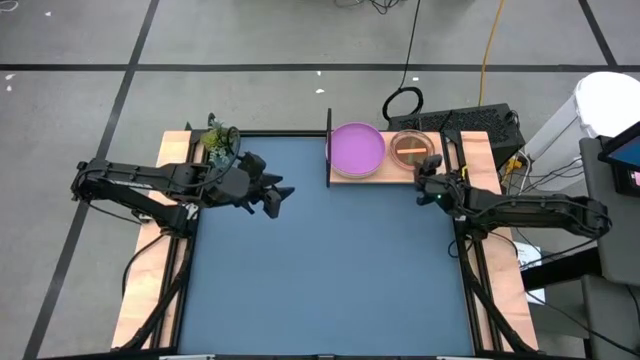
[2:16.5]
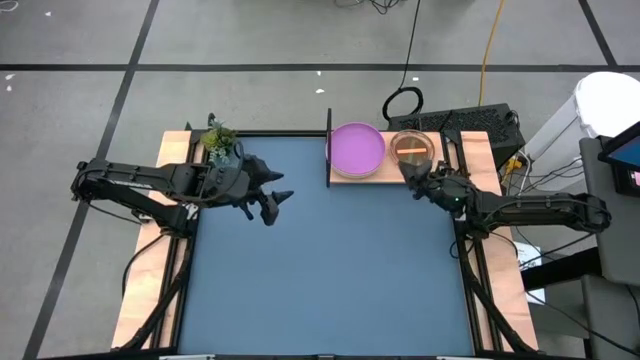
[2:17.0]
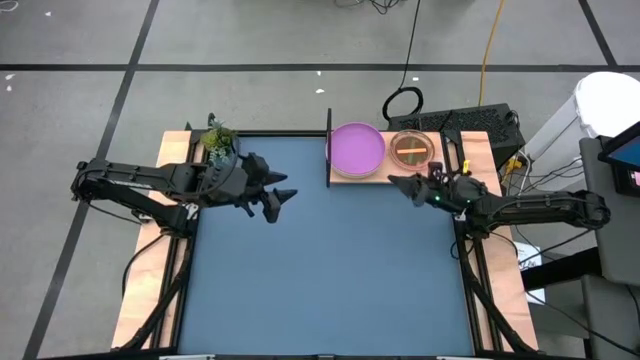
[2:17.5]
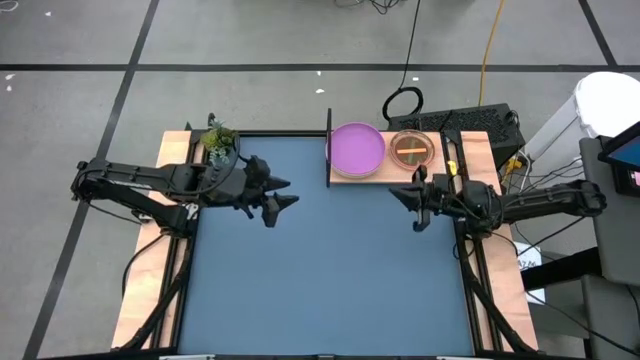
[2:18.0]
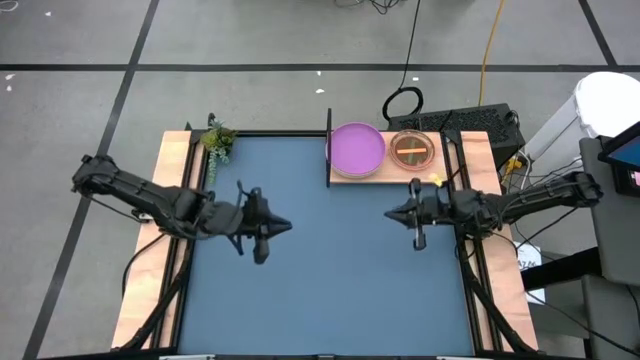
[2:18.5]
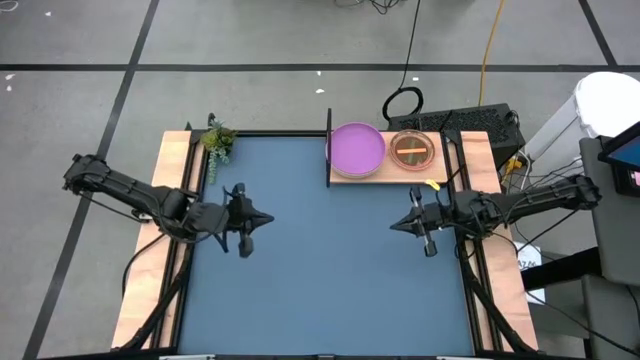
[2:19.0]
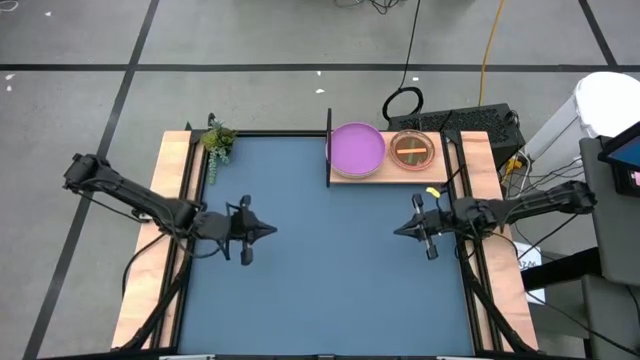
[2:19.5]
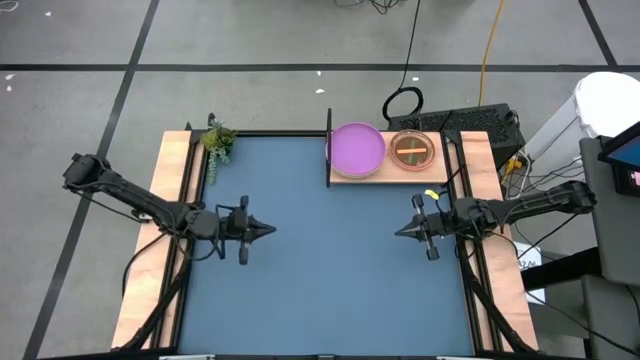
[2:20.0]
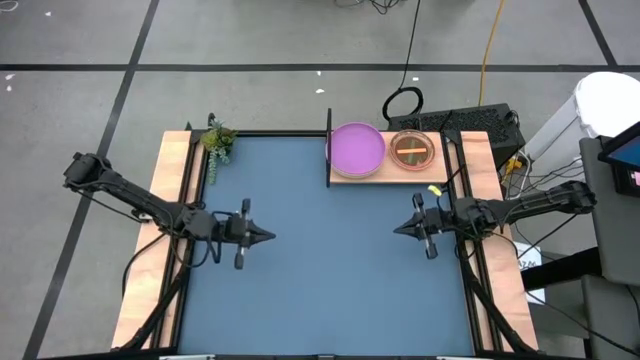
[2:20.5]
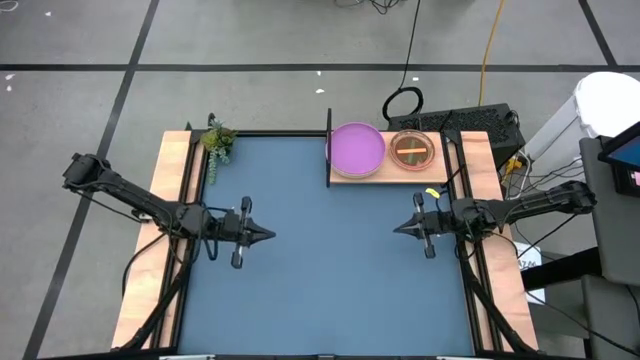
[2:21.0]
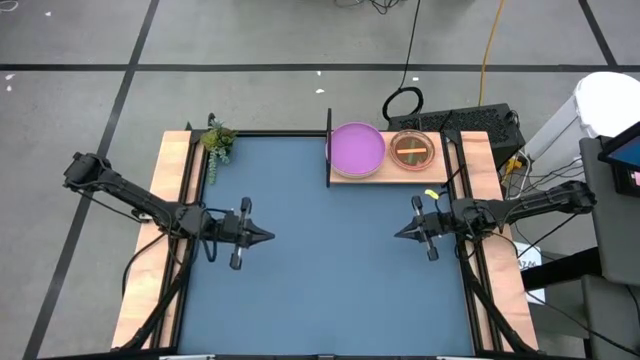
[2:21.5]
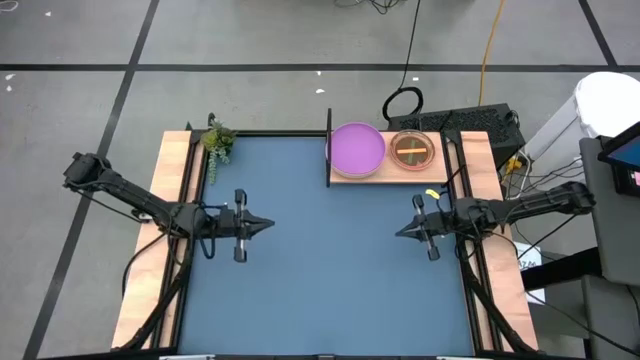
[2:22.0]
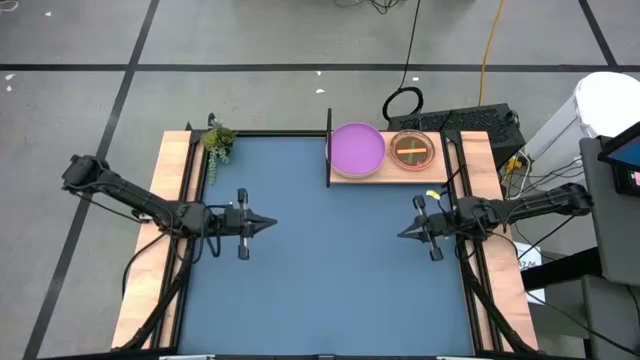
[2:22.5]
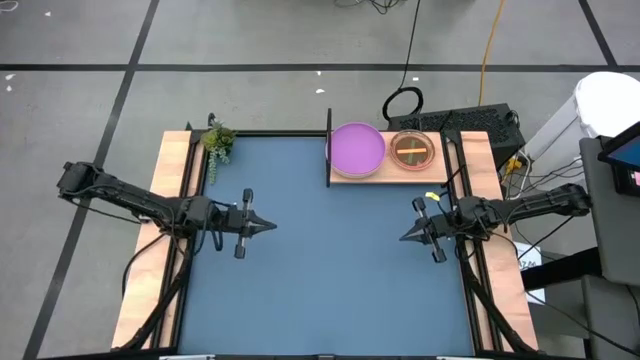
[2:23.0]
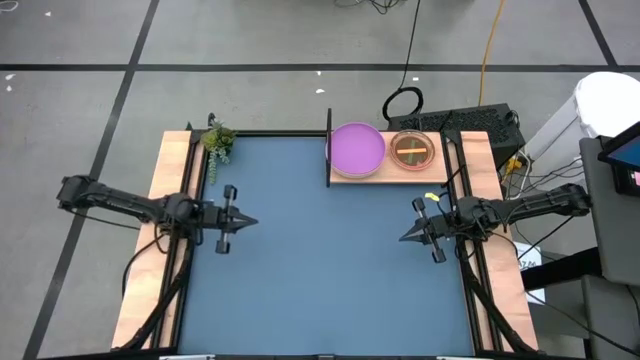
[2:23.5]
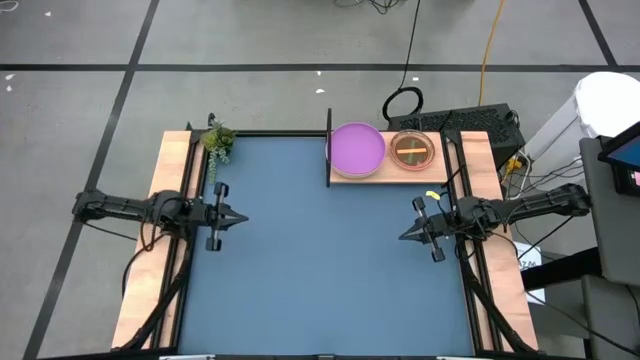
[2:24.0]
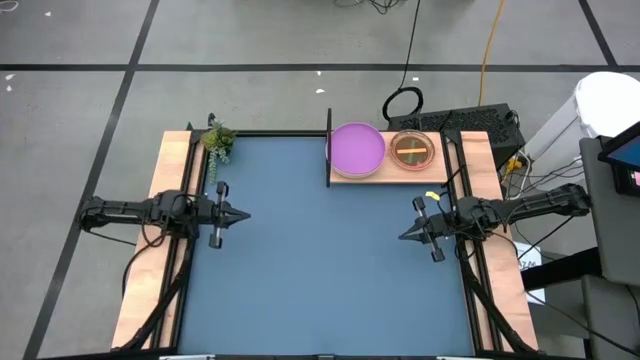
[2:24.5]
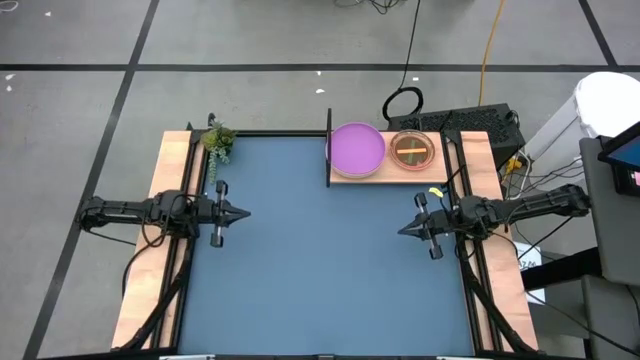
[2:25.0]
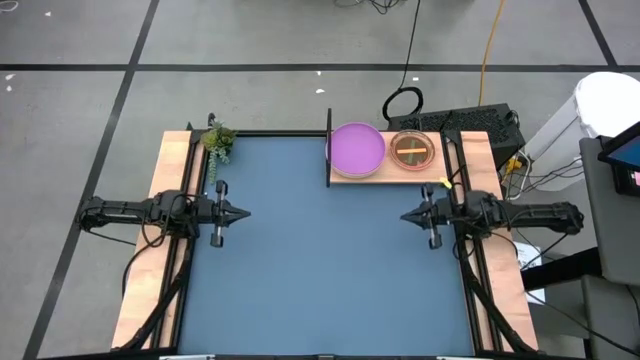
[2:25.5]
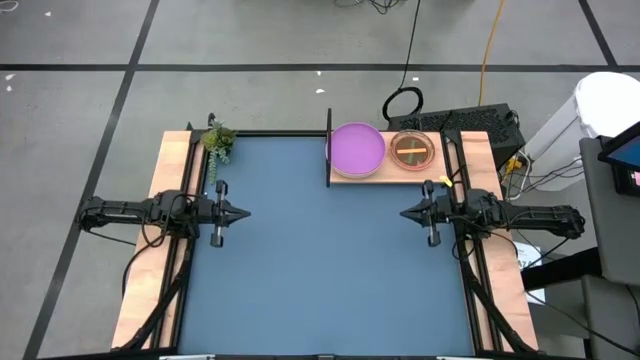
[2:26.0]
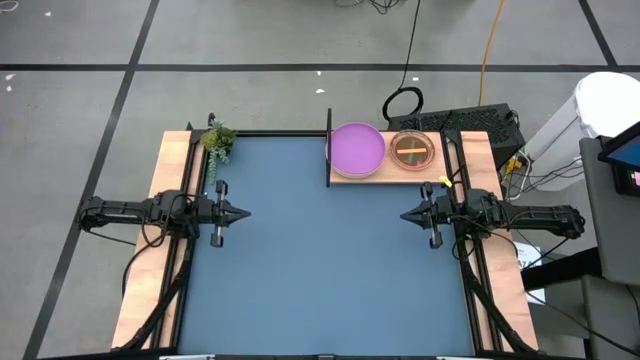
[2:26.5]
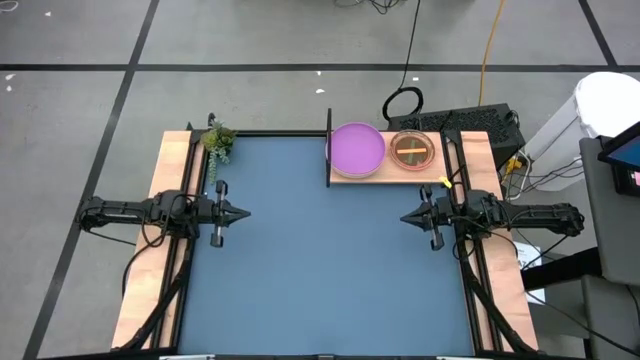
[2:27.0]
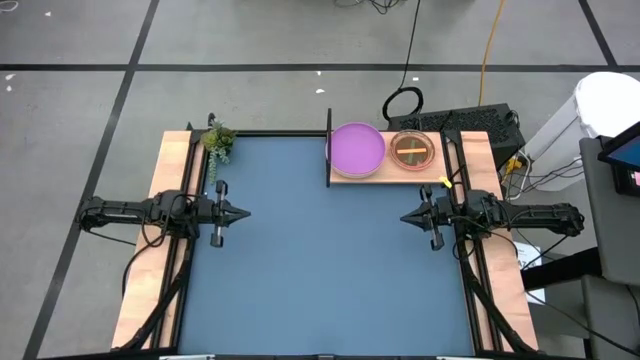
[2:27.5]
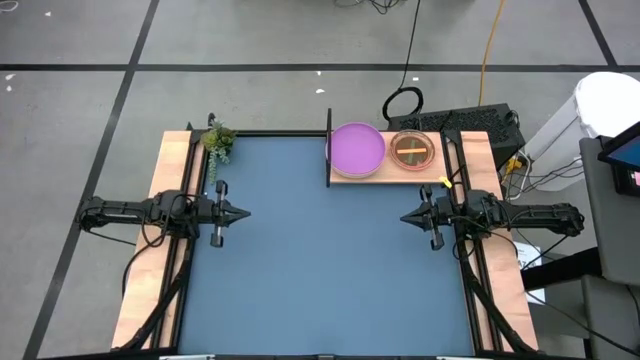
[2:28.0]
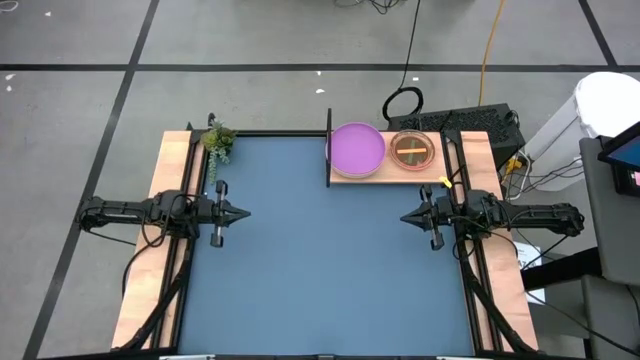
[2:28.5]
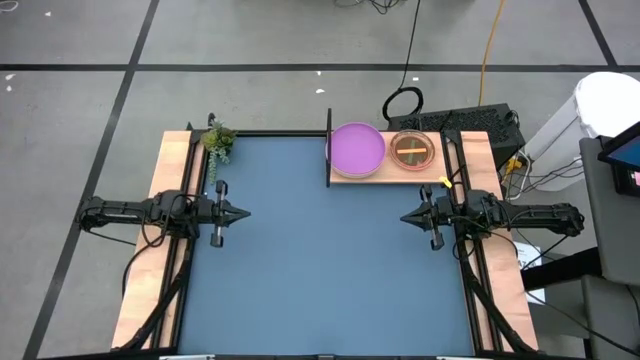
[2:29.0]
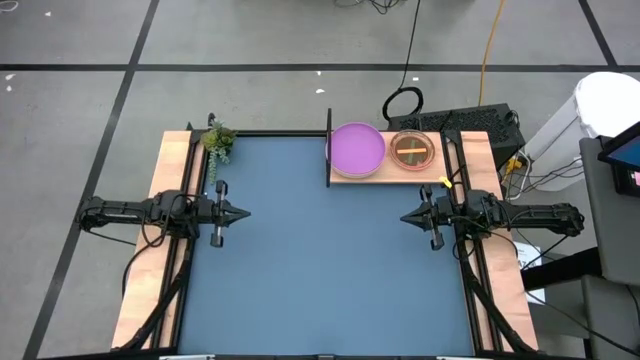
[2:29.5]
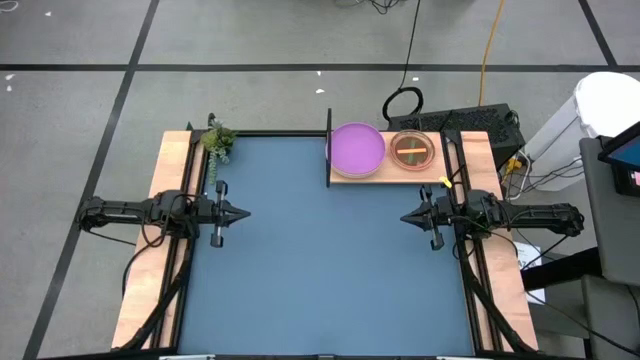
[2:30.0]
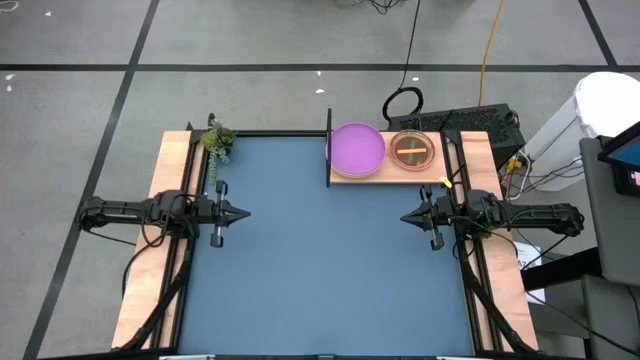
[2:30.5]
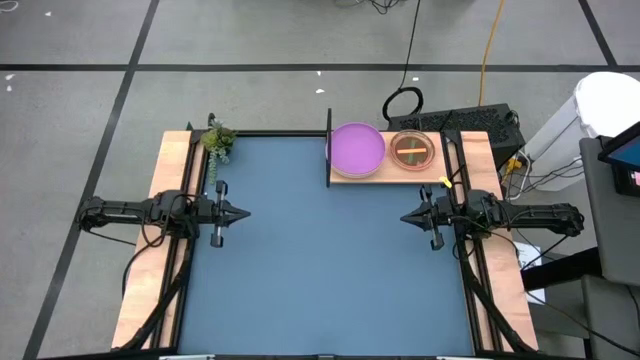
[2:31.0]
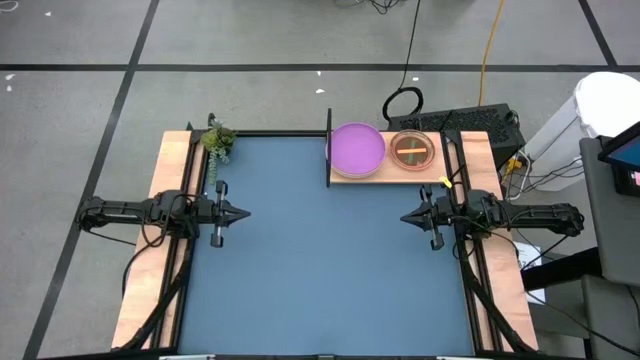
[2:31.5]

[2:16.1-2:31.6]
Task: Place and stack plates onto a shelf
Return to Home Position

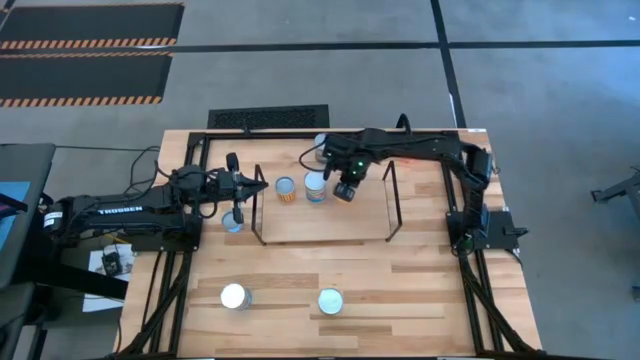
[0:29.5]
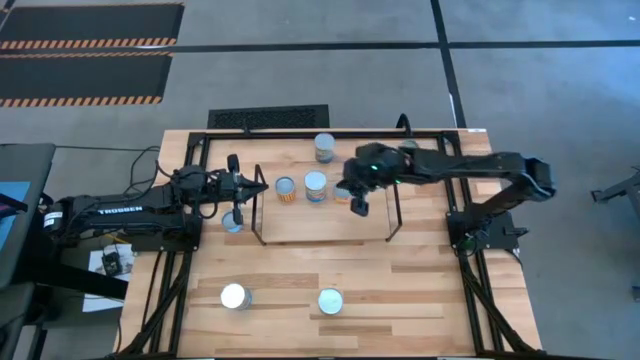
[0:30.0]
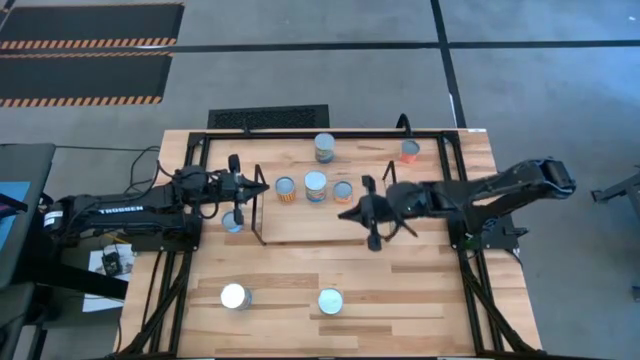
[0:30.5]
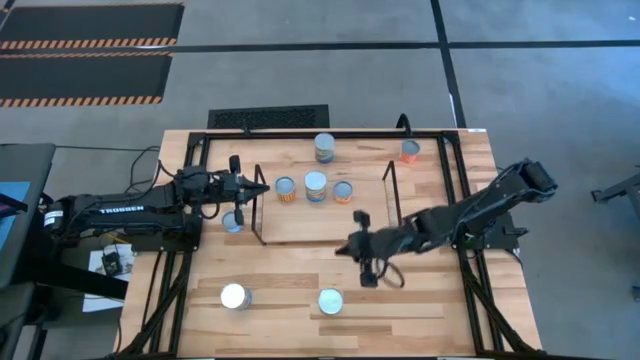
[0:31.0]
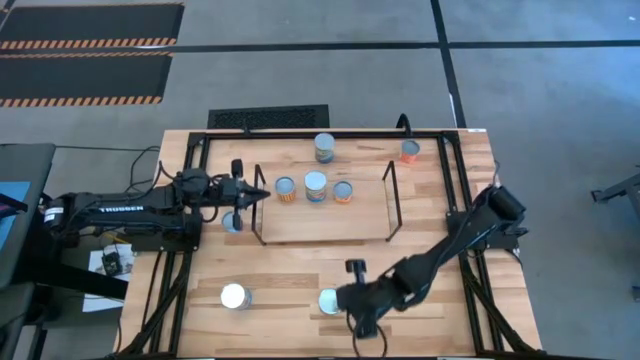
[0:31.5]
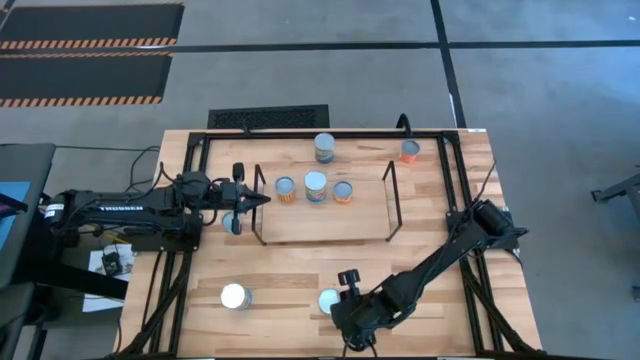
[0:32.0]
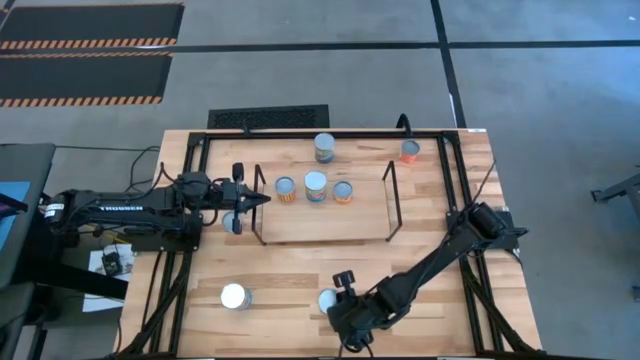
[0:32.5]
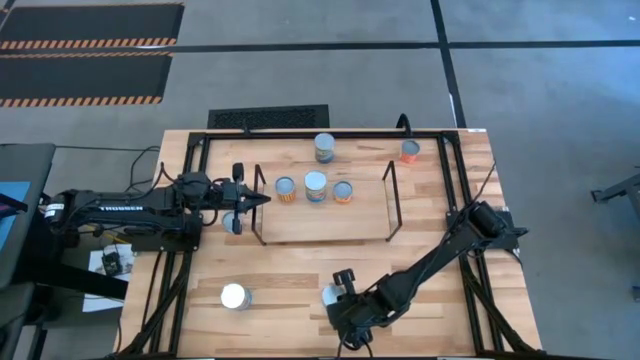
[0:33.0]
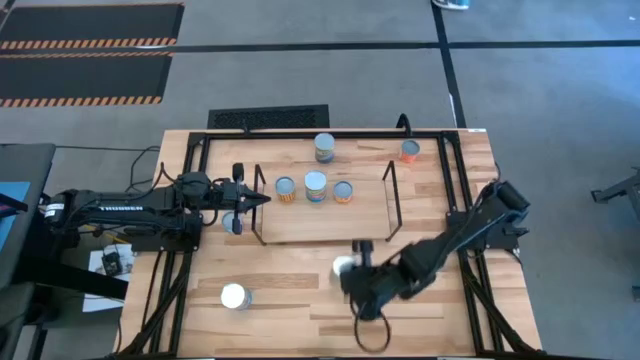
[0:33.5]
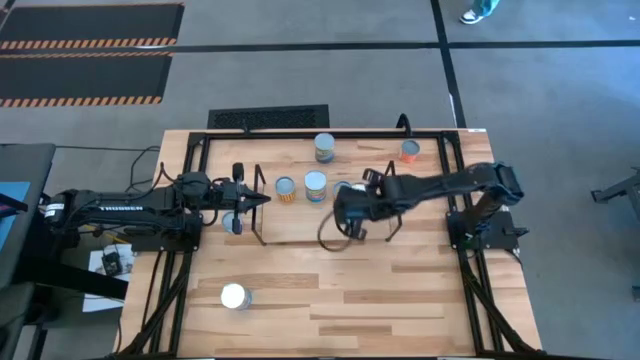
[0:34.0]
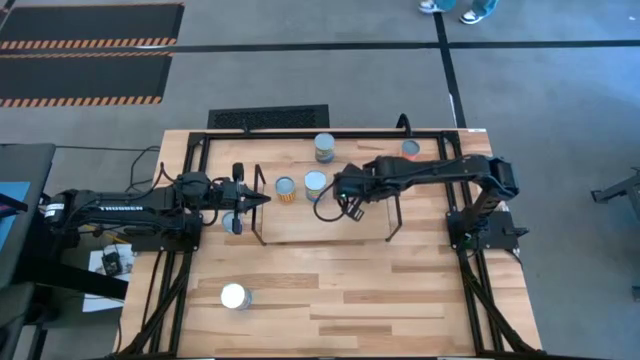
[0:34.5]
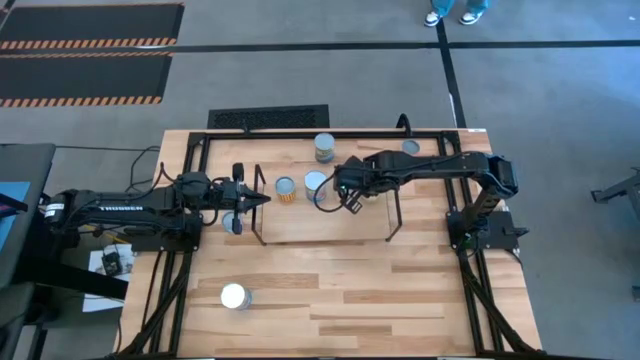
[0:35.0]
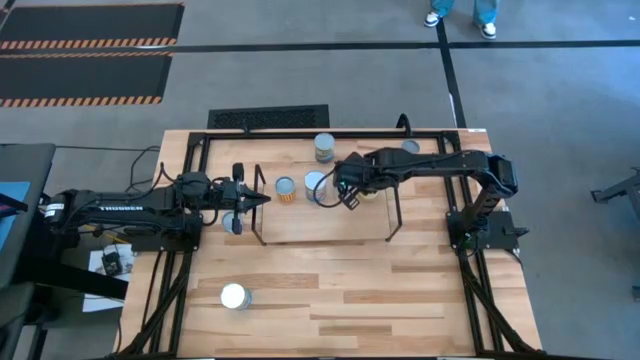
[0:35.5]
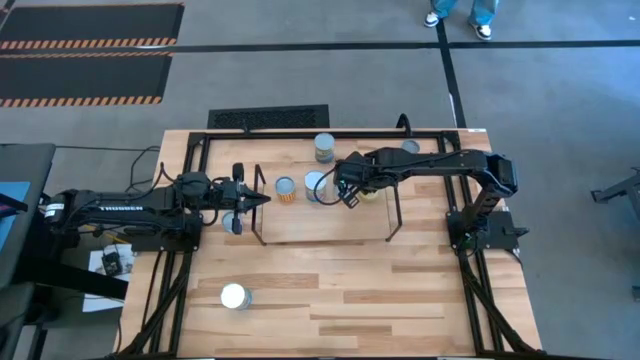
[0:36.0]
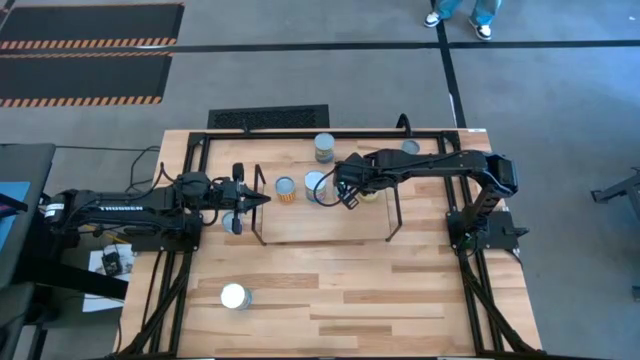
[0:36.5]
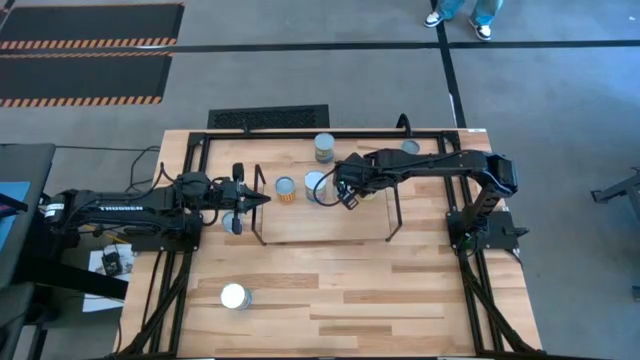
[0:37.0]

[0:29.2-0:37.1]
Task: Pick and place cans onto a shelf
Put the carrots can on the shelf
